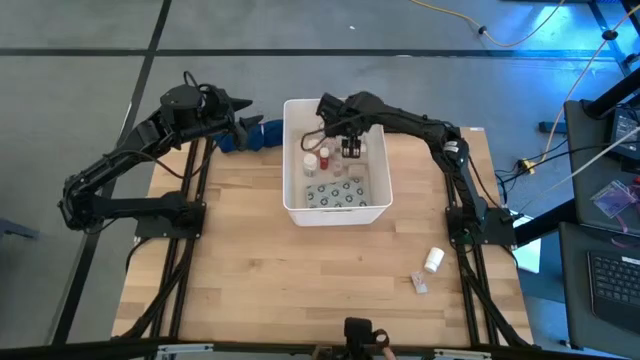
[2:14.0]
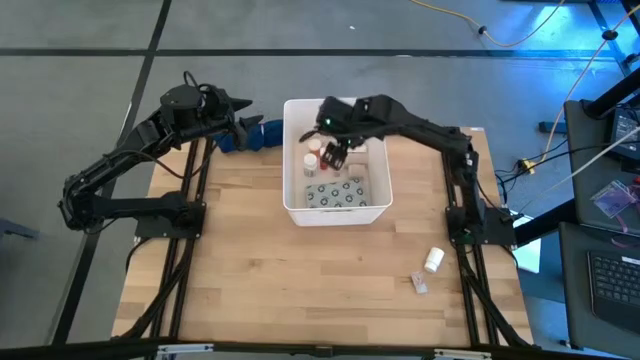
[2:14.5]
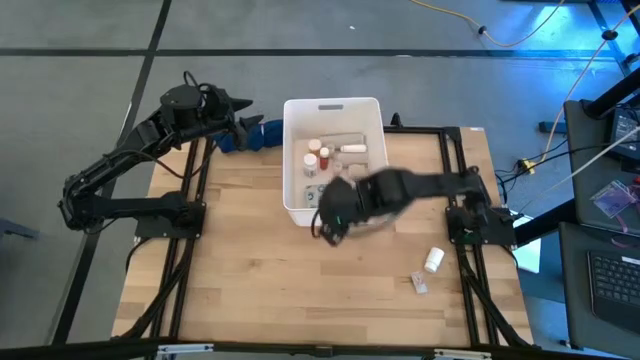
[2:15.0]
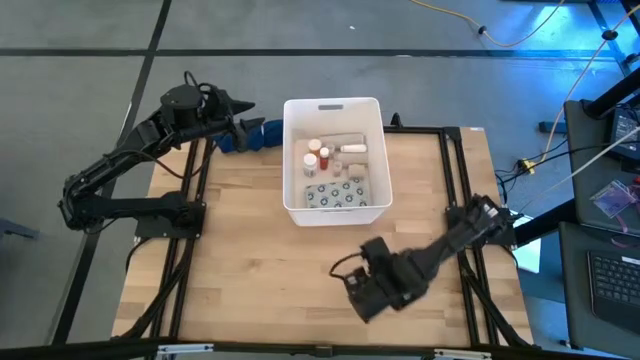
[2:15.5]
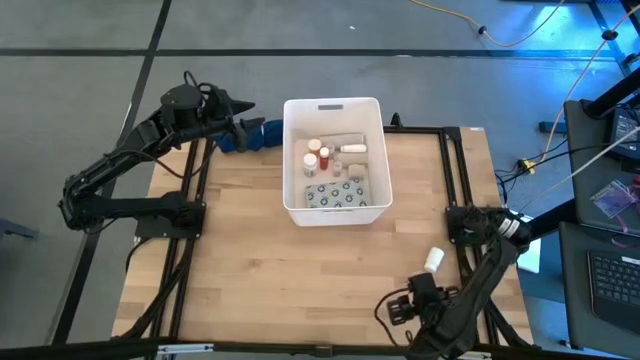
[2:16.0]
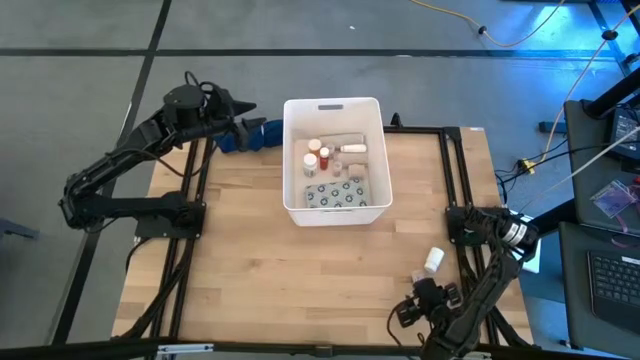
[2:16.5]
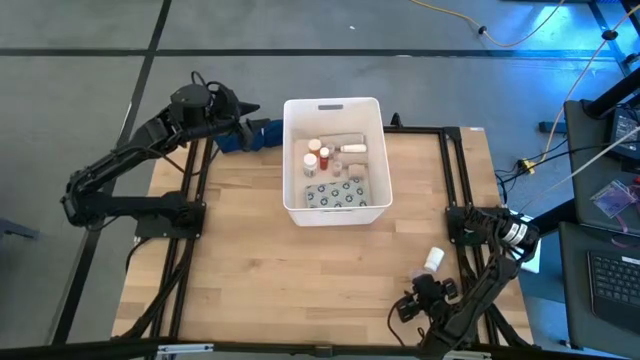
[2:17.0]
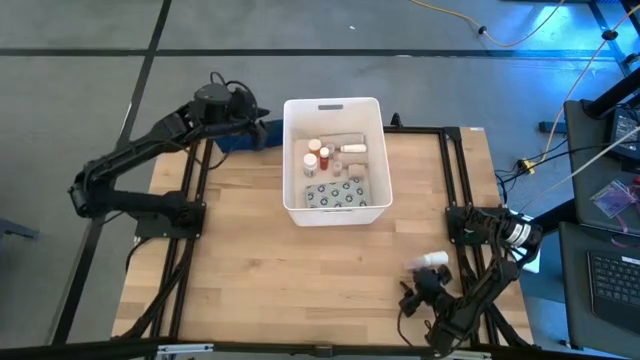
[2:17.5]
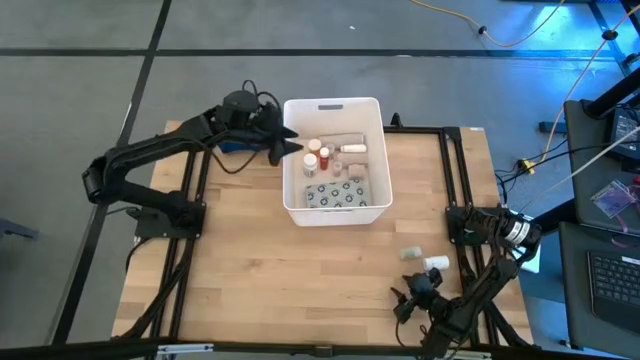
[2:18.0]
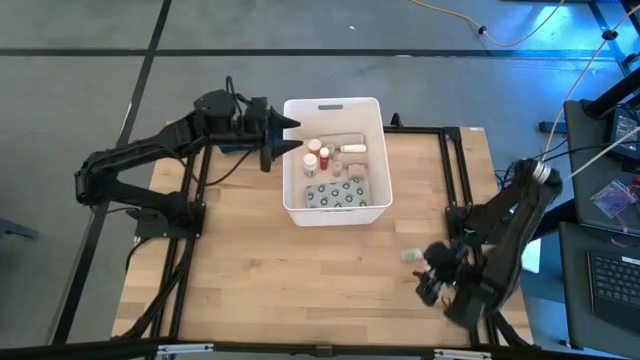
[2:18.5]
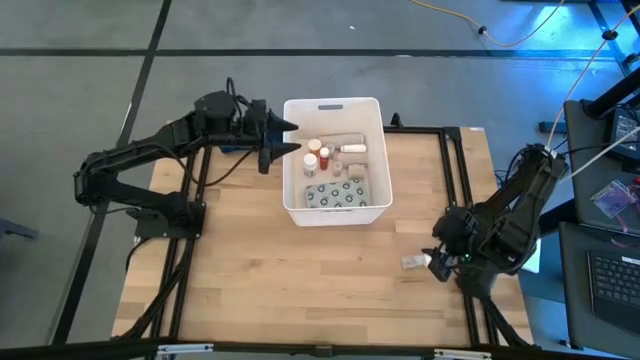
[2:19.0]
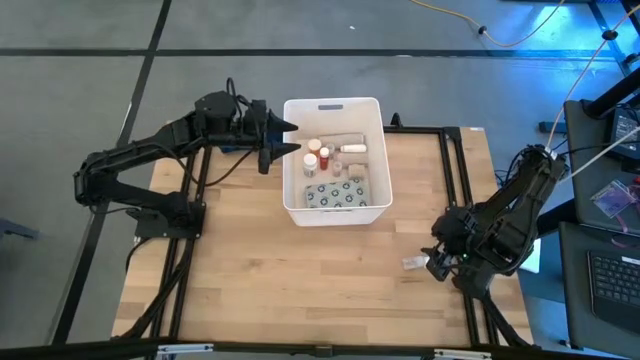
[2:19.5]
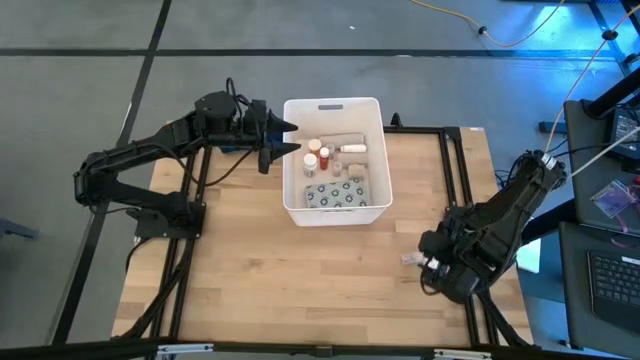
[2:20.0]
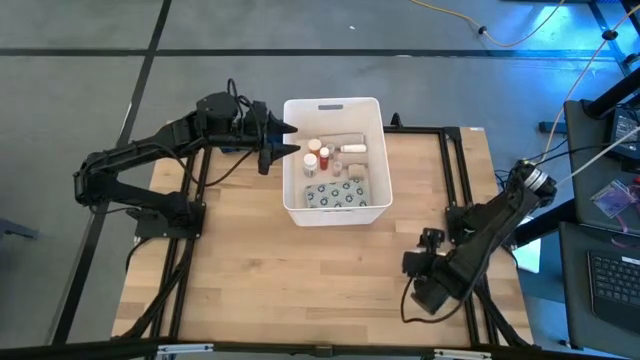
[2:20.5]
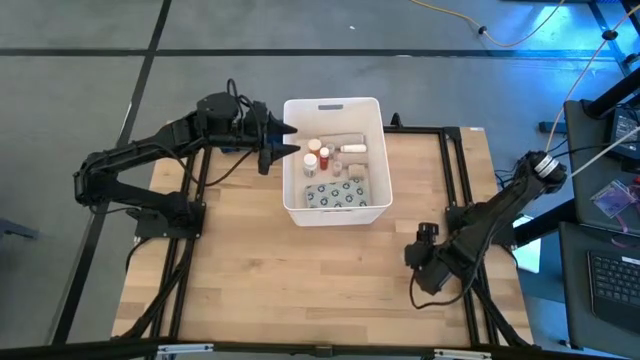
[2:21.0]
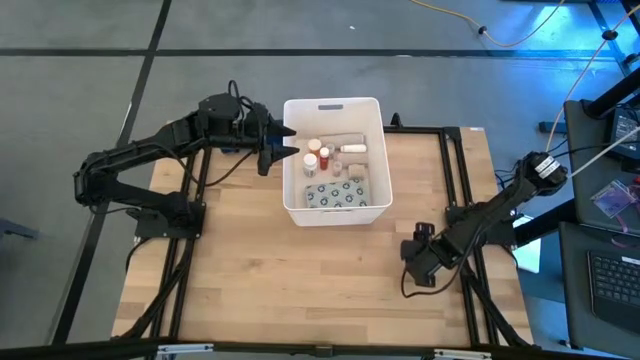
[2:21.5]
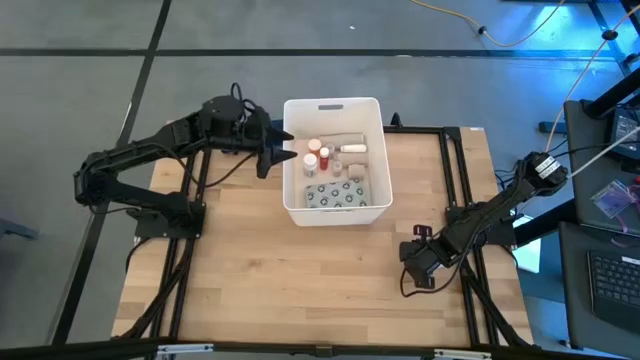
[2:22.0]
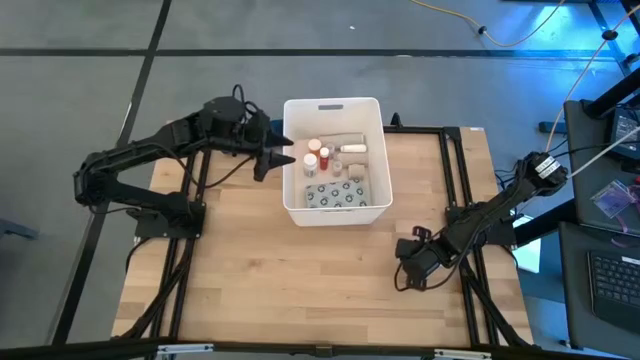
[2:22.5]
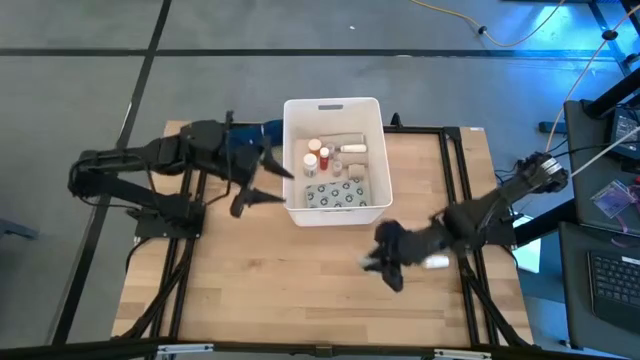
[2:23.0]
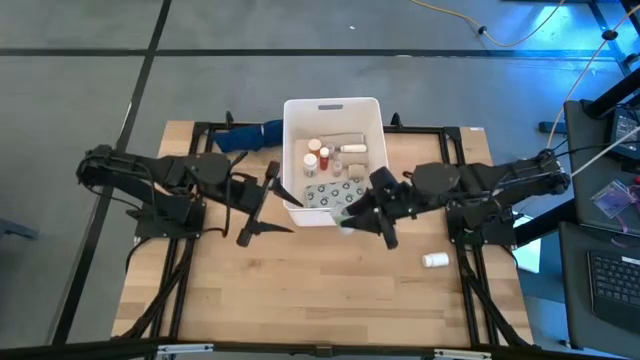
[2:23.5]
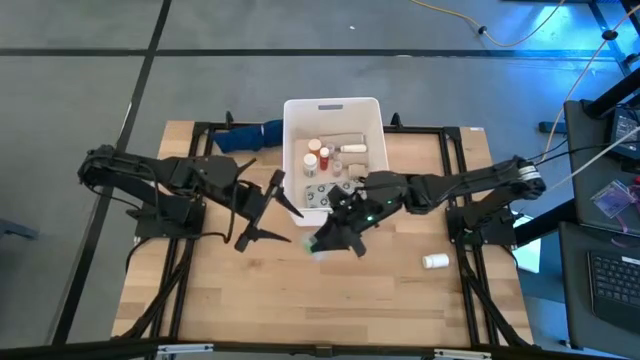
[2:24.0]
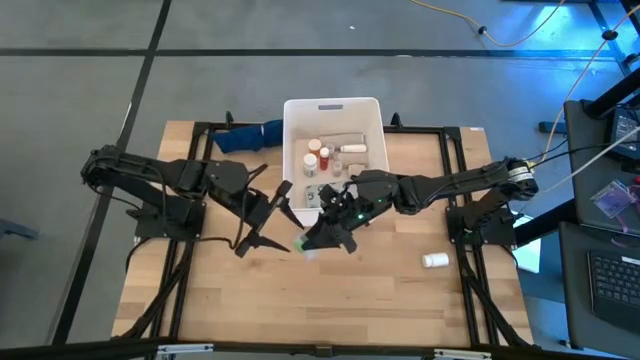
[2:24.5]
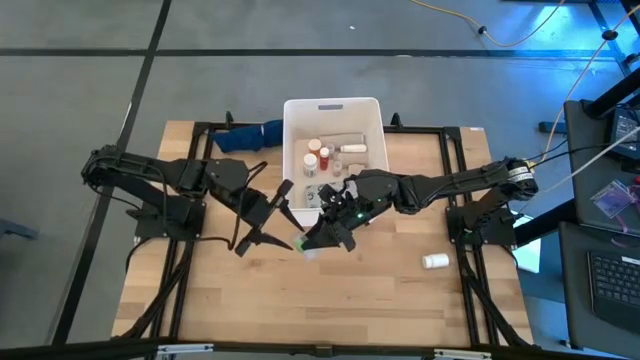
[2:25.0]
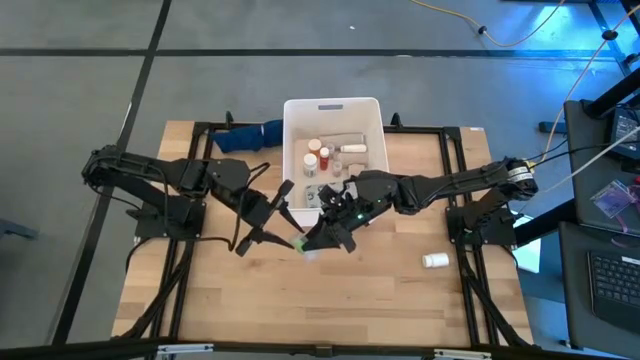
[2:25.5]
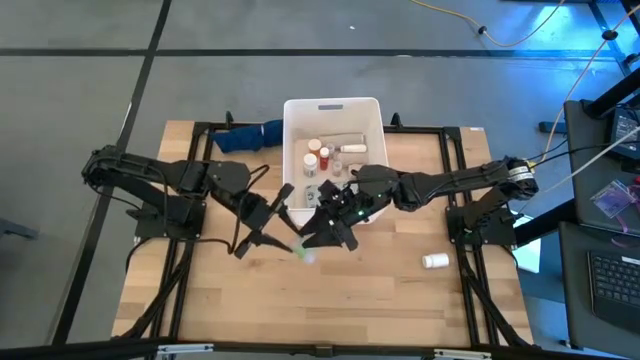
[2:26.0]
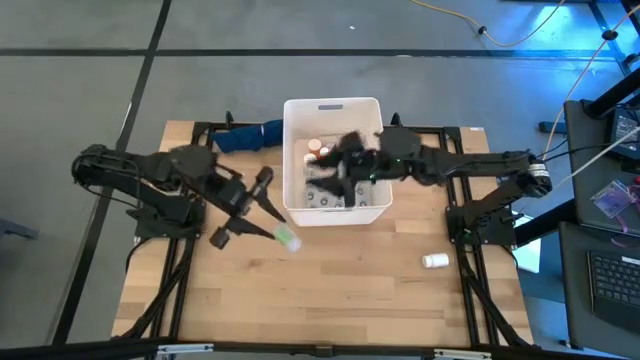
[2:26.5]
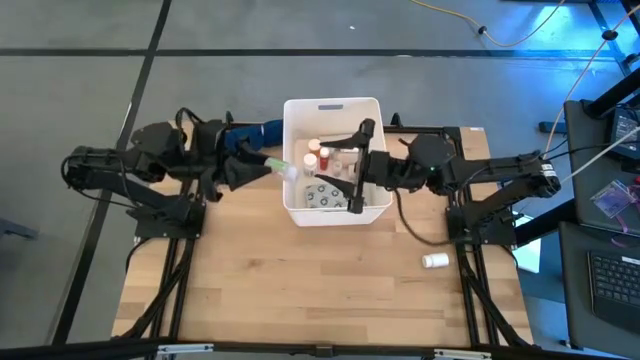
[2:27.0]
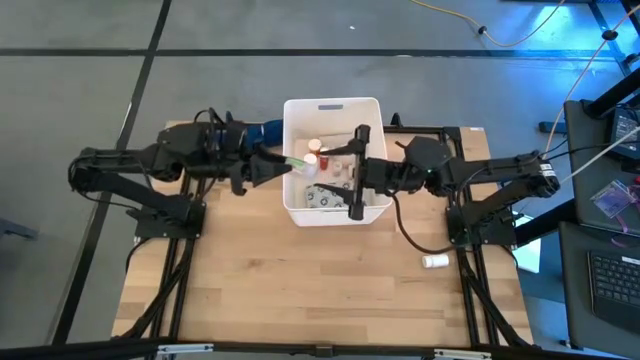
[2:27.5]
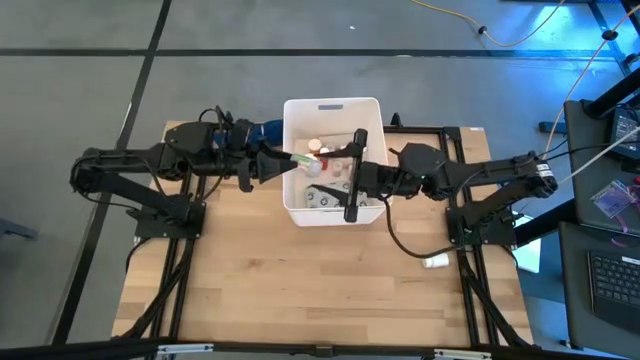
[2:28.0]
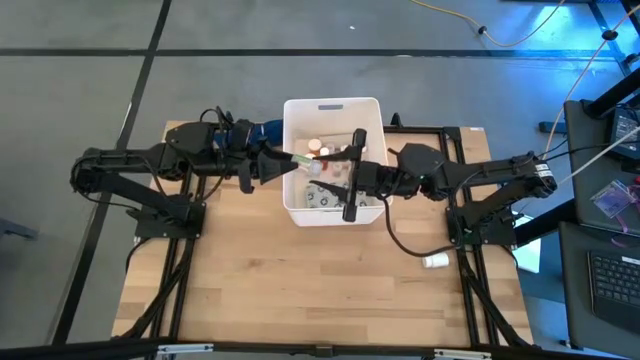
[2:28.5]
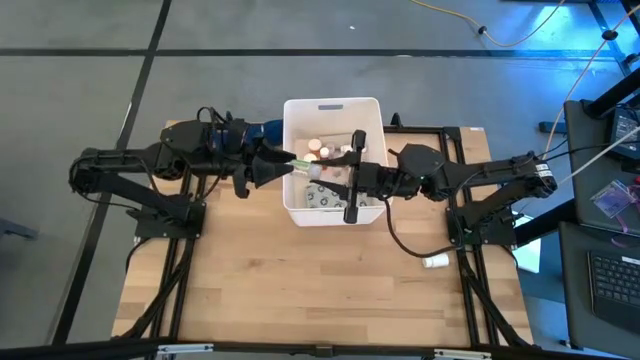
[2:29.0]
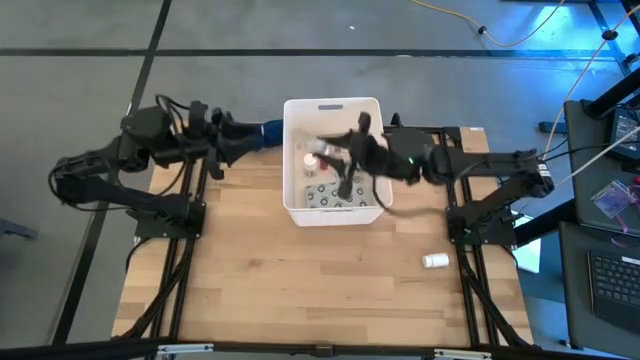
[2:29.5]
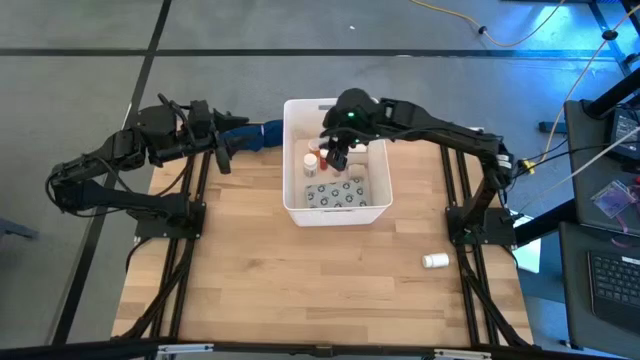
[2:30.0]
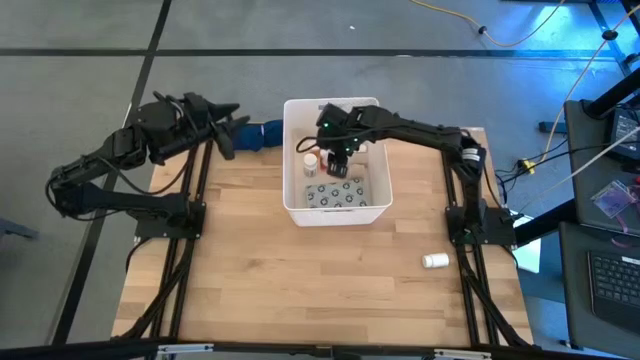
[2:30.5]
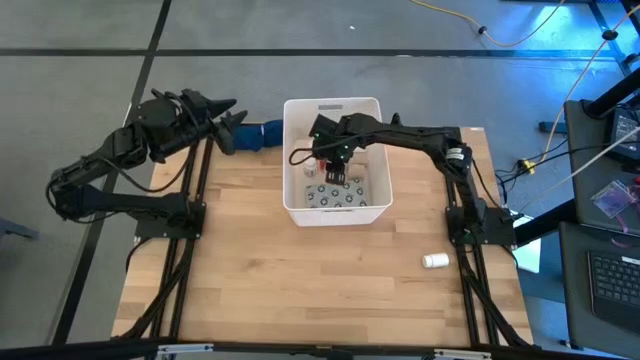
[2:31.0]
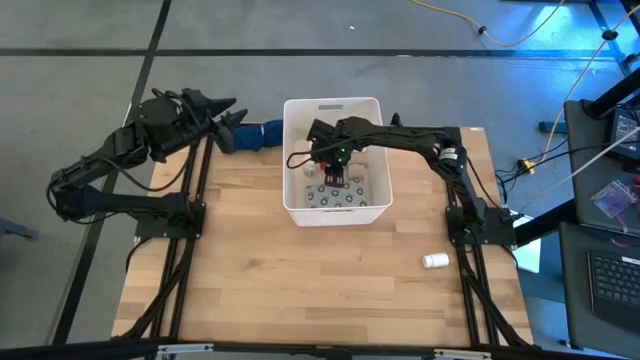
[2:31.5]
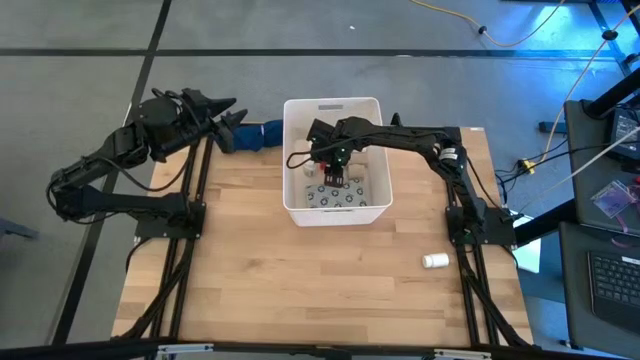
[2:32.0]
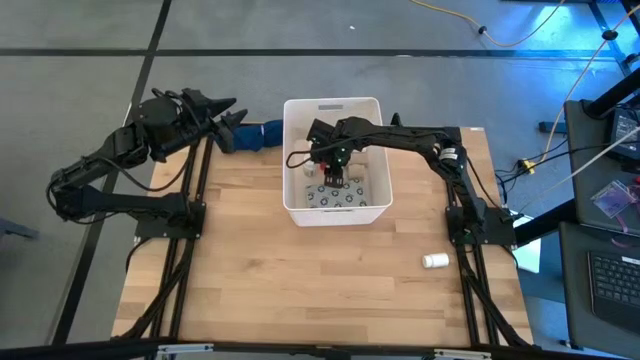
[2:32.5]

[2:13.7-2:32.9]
Task: Pick & place medical supplies in basket/bin
Put the transparent medicine bottle into the bin

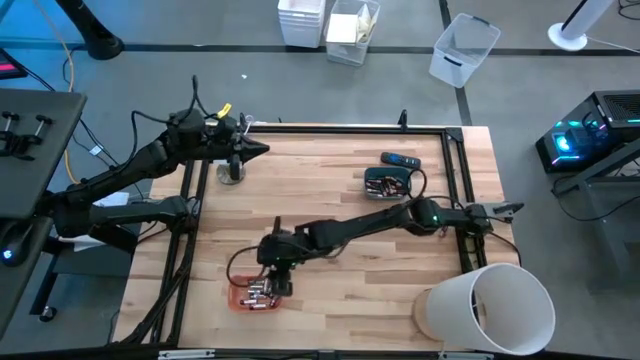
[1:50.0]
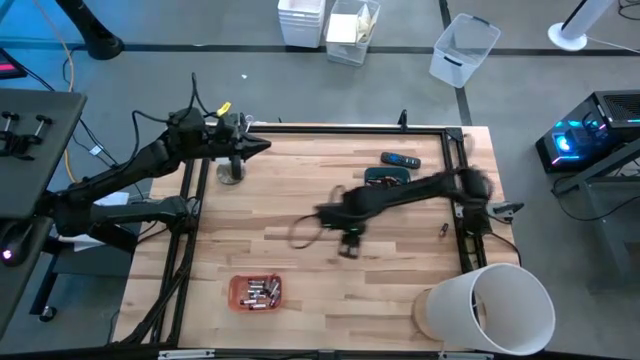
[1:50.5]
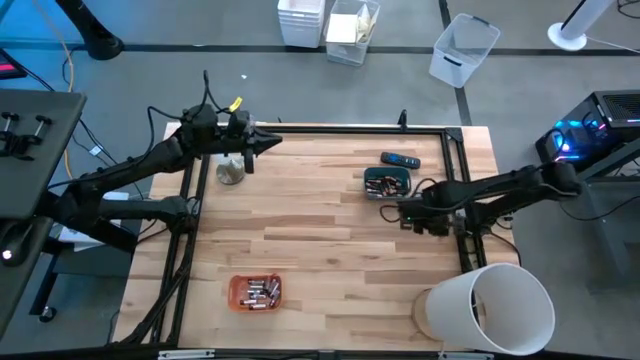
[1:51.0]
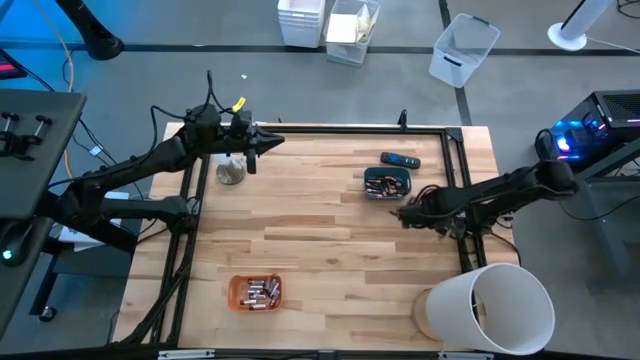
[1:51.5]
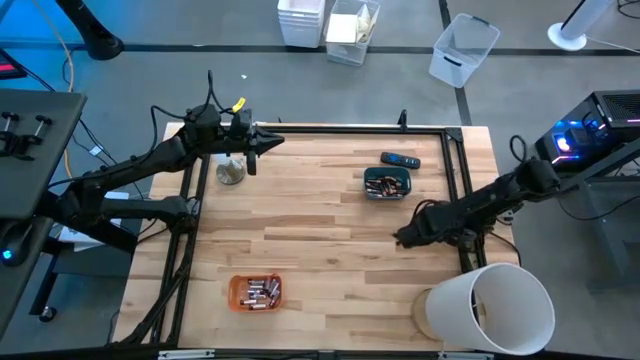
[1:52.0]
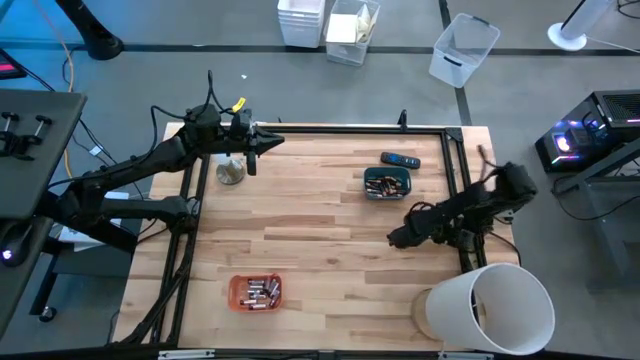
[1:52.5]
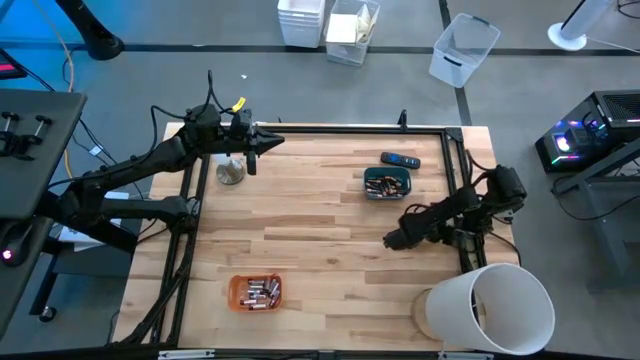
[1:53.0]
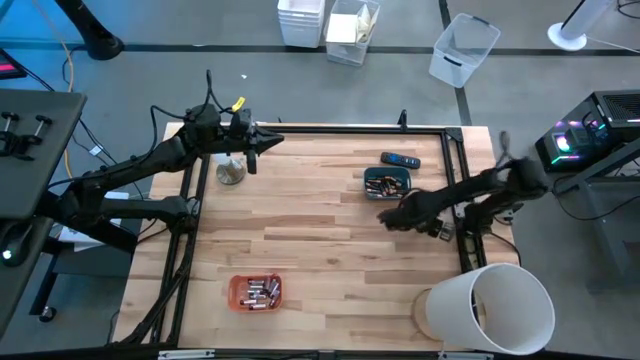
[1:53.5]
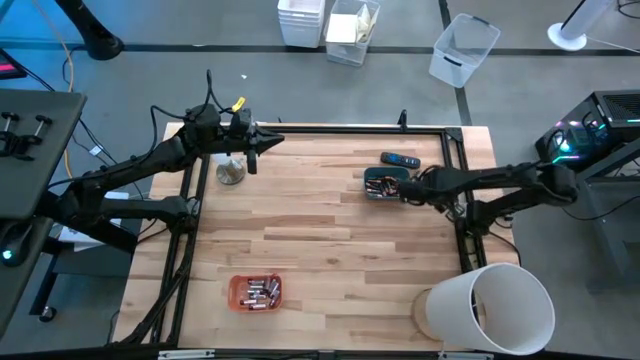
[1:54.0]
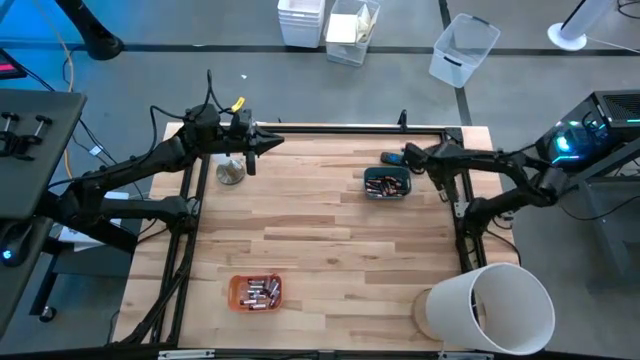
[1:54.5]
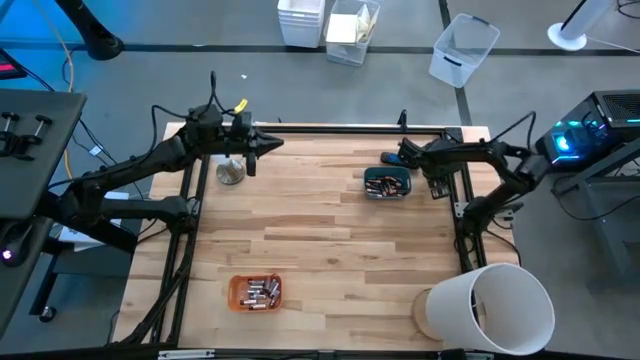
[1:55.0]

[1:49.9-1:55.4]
Task: Sort batteries
Put the black battery into the blue bin
